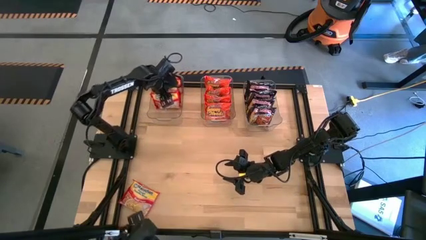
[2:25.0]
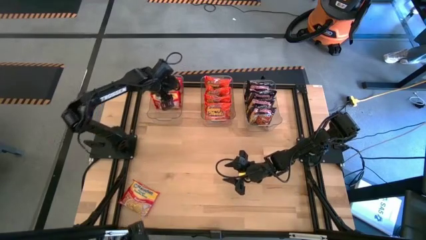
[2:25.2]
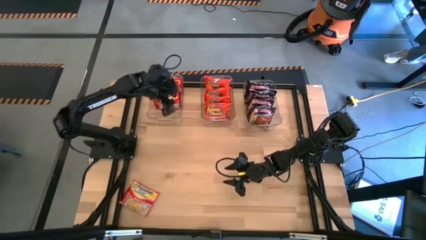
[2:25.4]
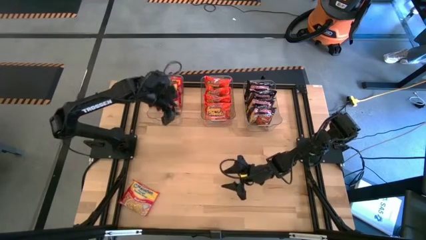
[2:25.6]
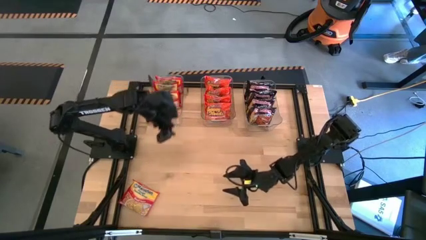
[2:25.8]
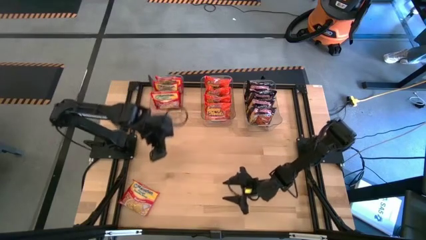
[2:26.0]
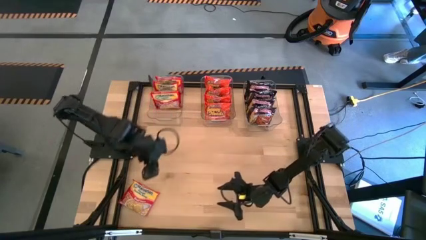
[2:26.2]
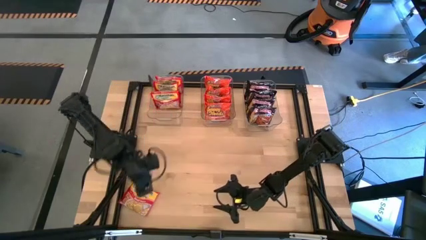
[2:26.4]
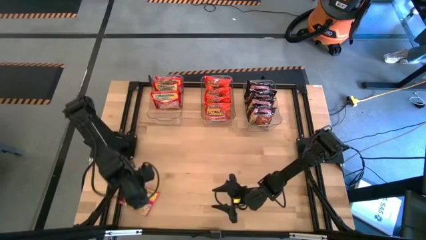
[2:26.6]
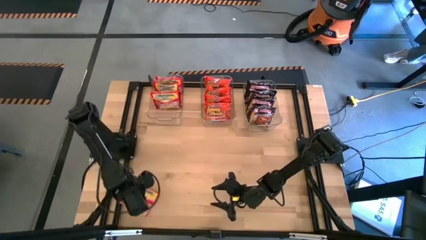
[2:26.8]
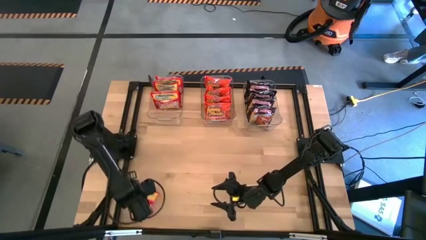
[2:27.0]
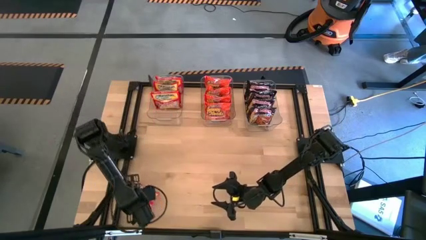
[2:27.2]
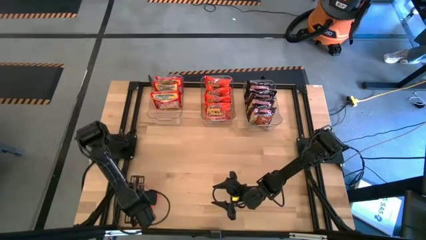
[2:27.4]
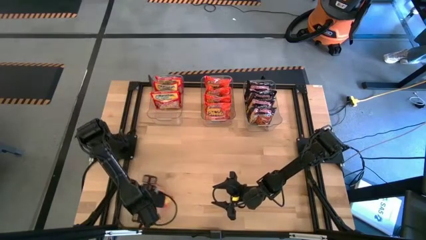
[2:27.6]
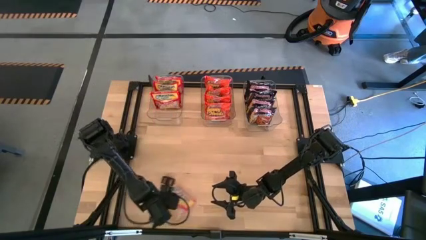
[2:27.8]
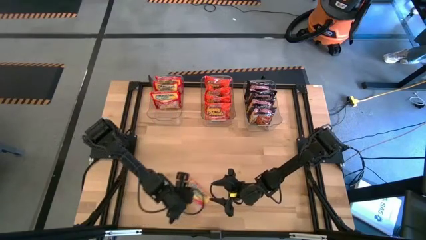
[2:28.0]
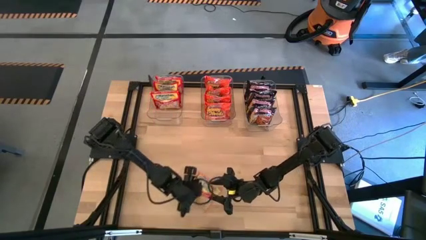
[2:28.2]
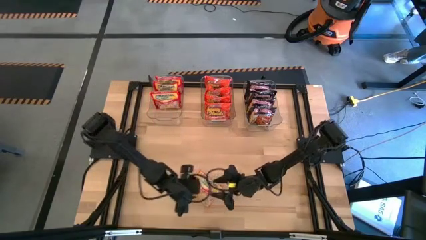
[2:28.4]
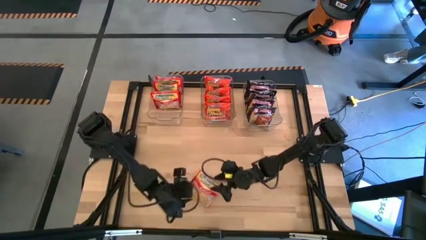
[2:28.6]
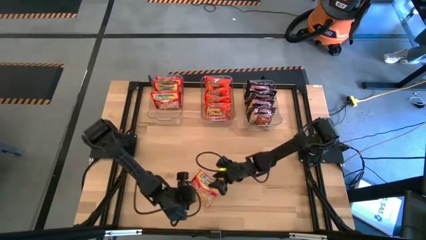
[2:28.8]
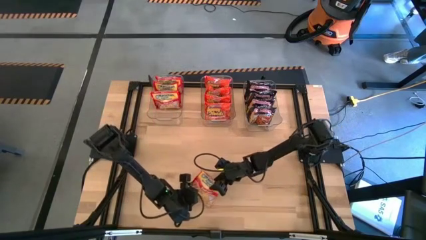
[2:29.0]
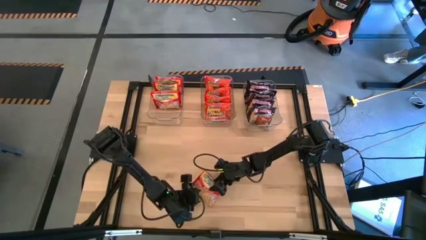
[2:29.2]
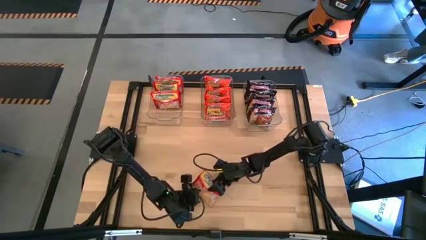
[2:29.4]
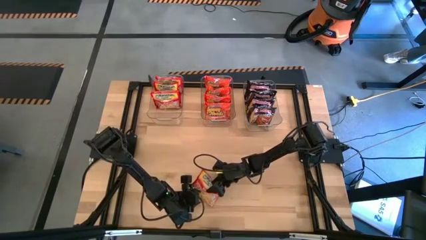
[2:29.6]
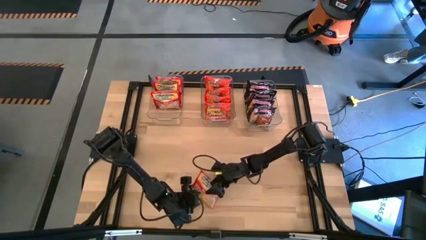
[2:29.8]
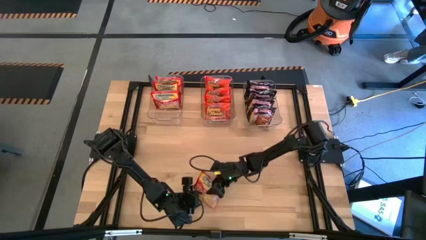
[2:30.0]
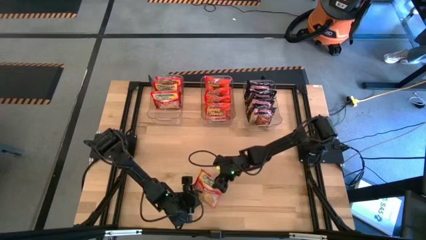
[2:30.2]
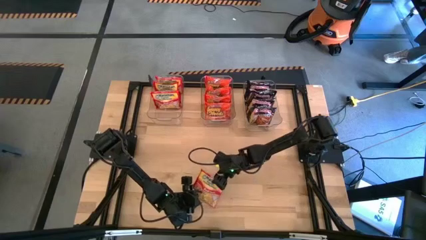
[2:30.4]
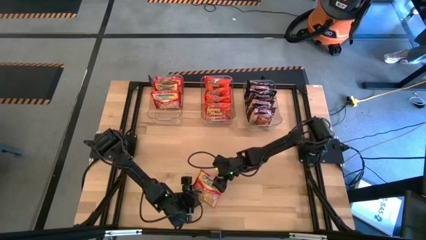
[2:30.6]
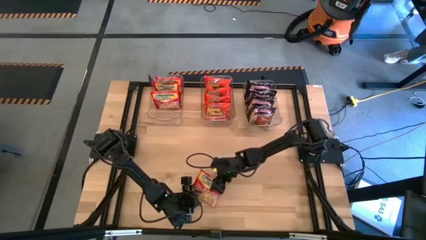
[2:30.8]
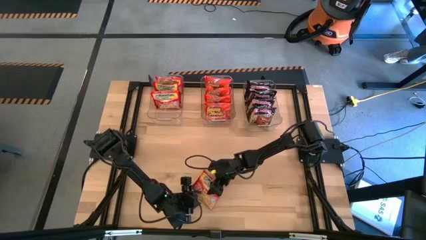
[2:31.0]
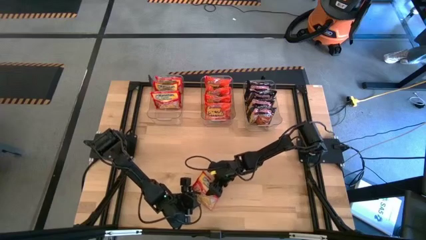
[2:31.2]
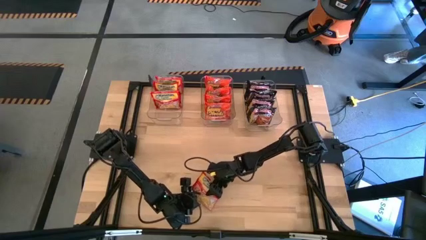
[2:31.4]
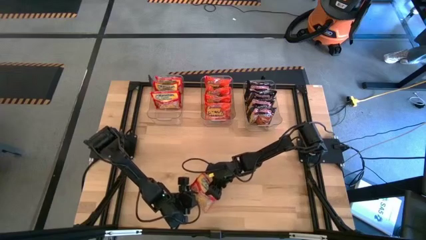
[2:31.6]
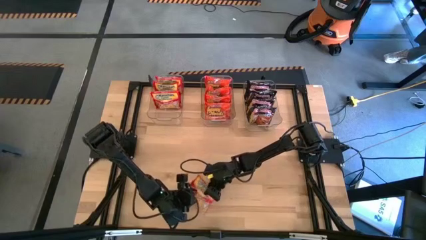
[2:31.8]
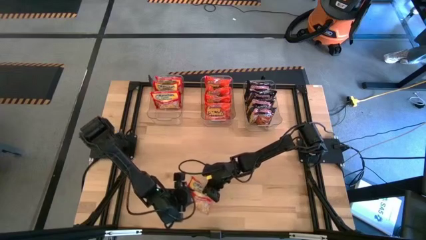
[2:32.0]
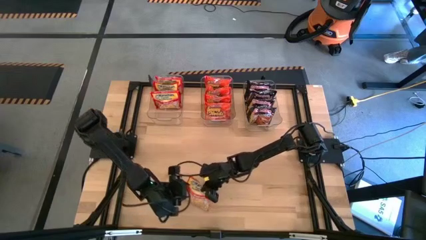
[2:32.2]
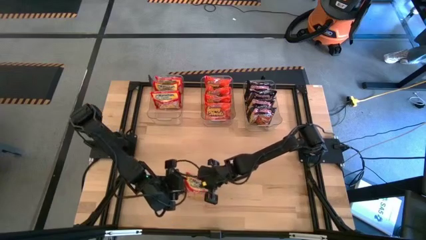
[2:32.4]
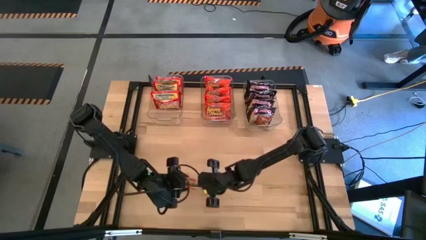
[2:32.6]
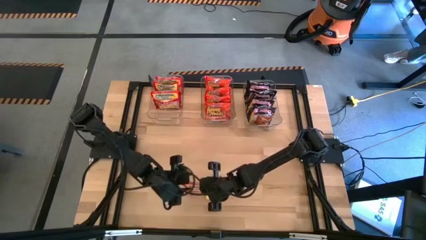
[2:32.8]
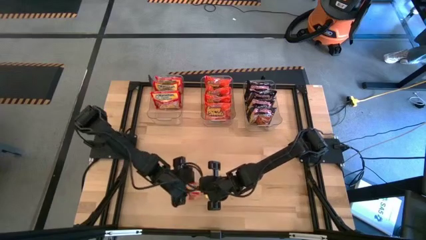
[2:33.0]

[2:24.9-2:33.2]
Task: Sort Maruchan noodles
Put the red noodle pack into the left transparent bin

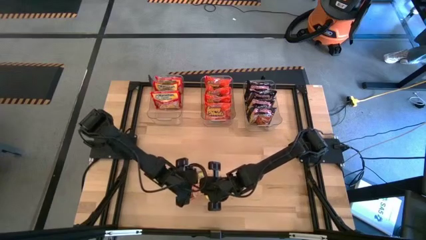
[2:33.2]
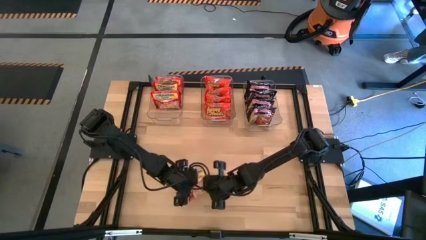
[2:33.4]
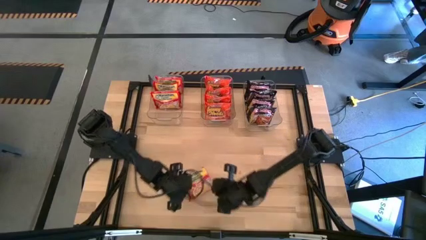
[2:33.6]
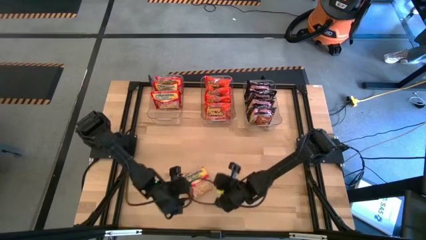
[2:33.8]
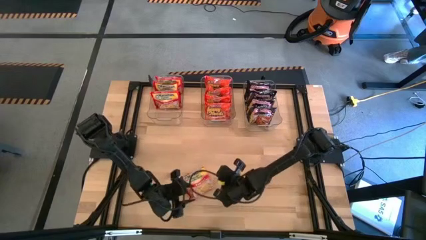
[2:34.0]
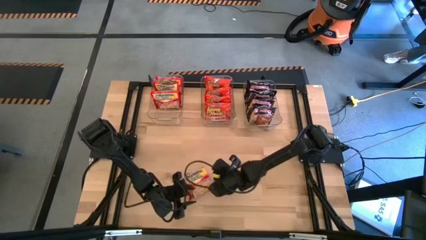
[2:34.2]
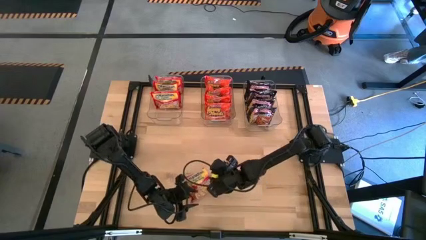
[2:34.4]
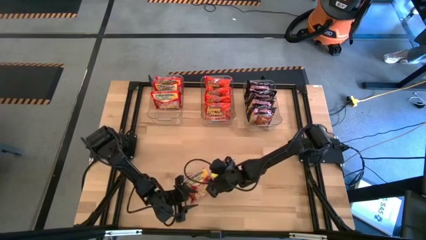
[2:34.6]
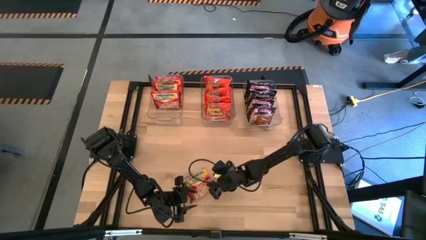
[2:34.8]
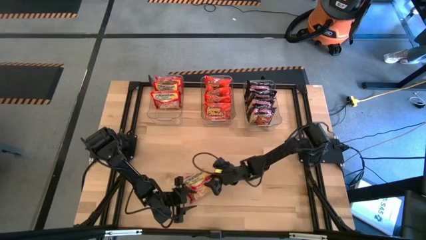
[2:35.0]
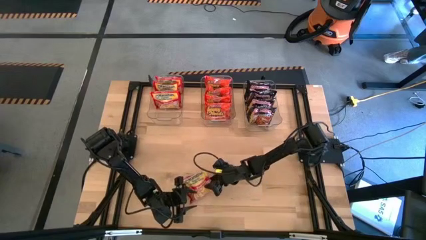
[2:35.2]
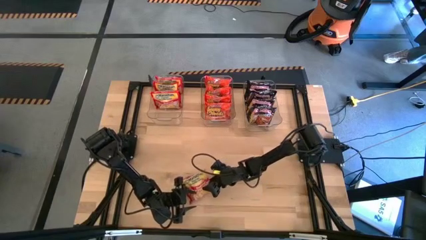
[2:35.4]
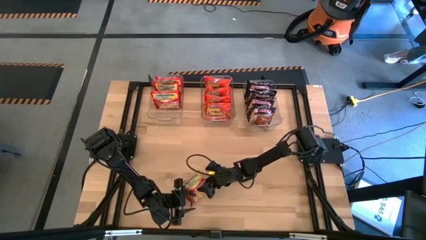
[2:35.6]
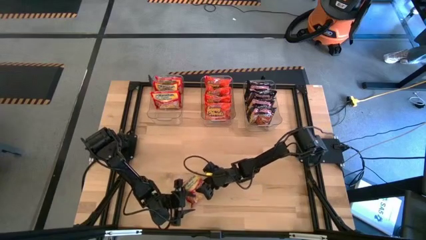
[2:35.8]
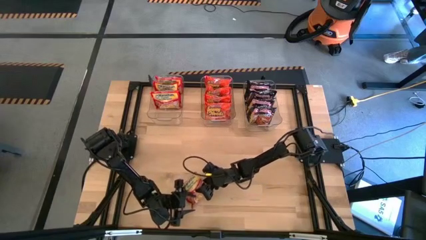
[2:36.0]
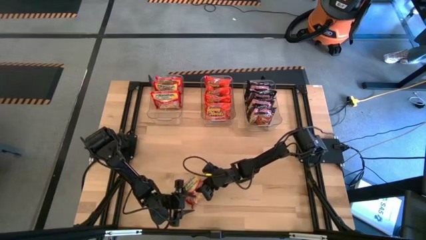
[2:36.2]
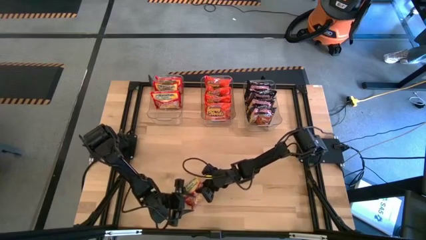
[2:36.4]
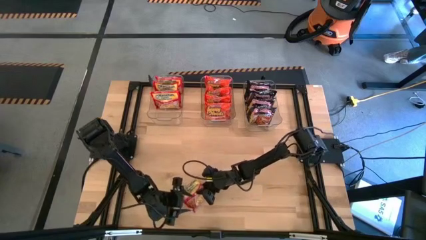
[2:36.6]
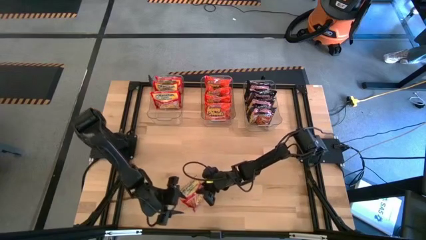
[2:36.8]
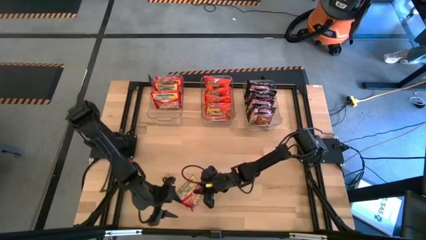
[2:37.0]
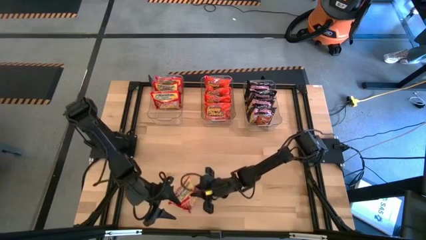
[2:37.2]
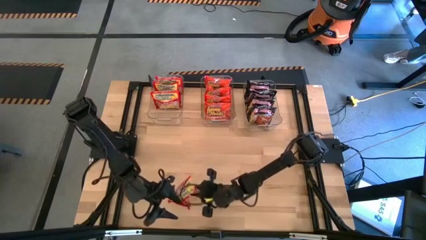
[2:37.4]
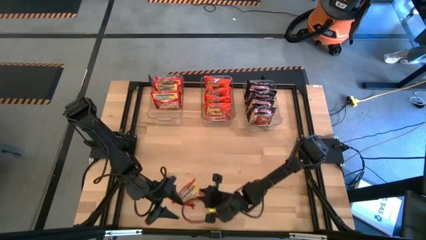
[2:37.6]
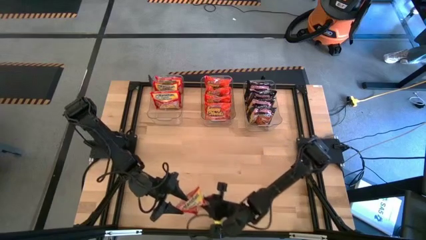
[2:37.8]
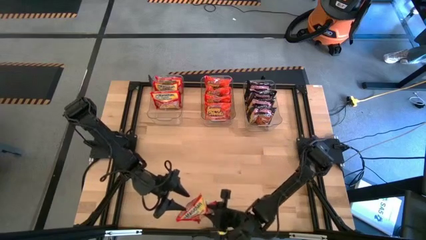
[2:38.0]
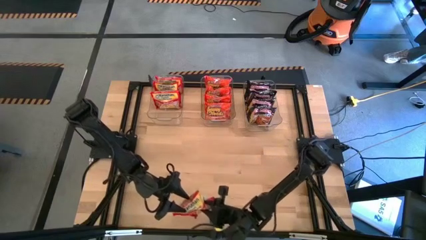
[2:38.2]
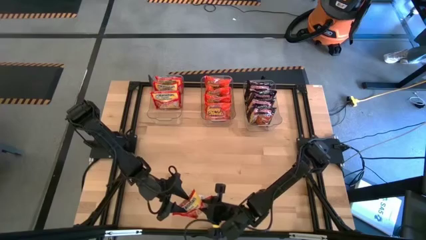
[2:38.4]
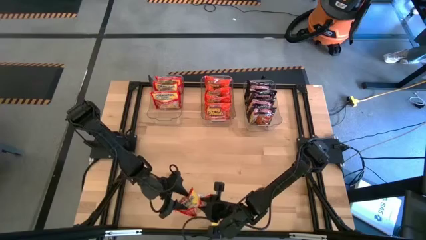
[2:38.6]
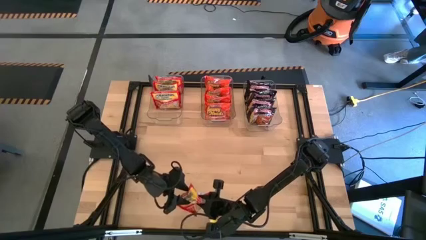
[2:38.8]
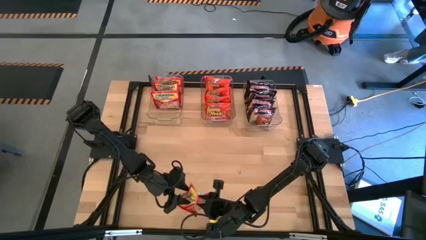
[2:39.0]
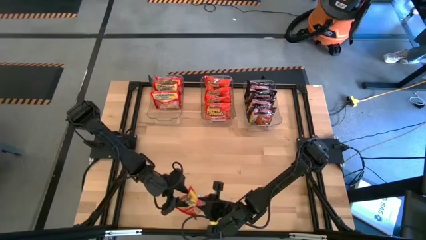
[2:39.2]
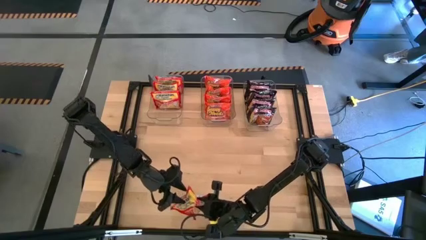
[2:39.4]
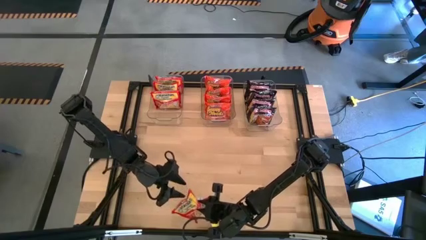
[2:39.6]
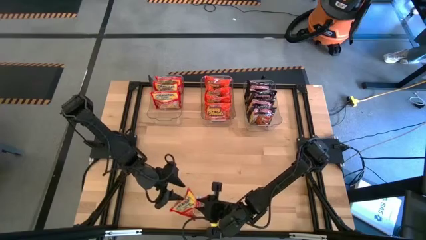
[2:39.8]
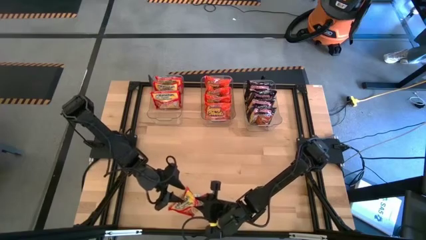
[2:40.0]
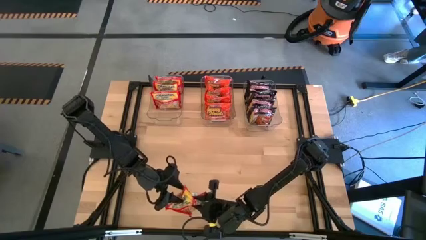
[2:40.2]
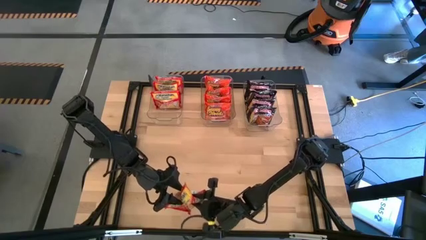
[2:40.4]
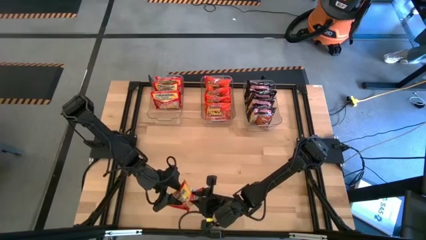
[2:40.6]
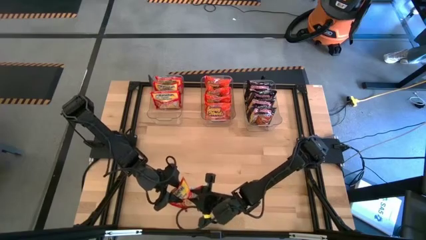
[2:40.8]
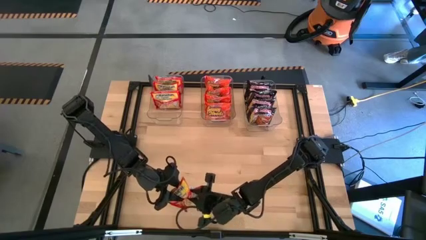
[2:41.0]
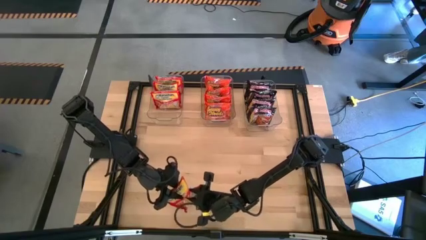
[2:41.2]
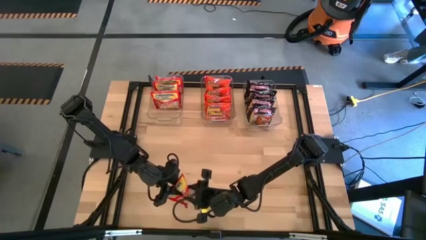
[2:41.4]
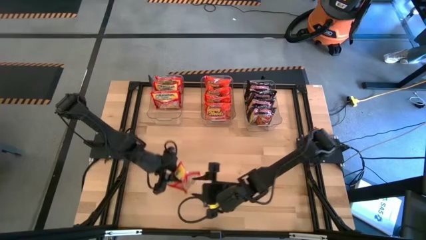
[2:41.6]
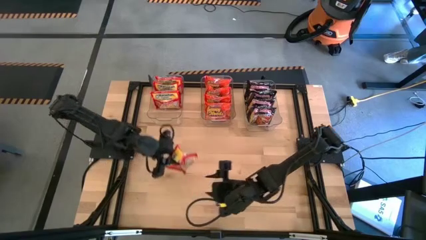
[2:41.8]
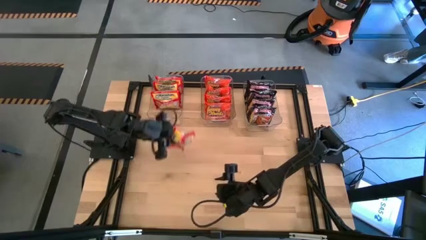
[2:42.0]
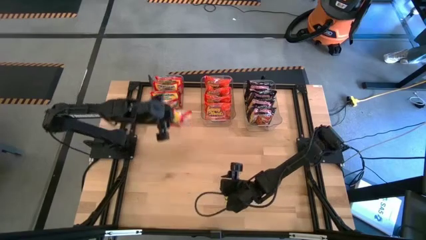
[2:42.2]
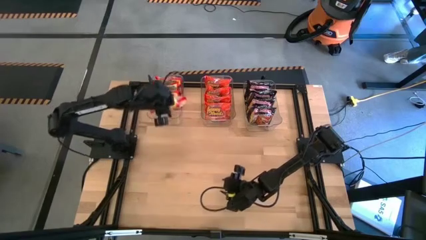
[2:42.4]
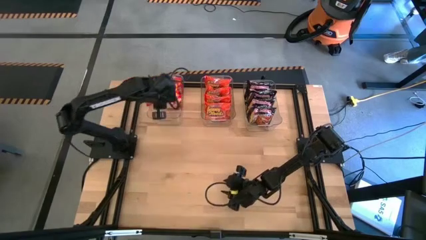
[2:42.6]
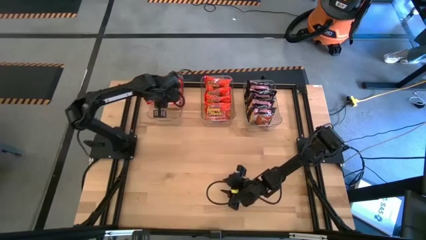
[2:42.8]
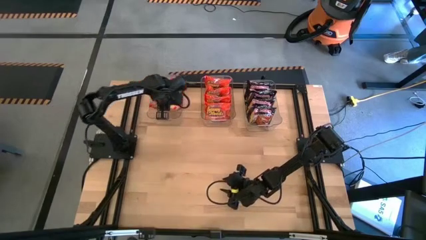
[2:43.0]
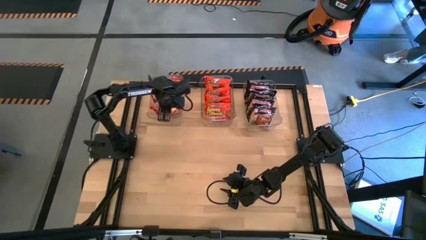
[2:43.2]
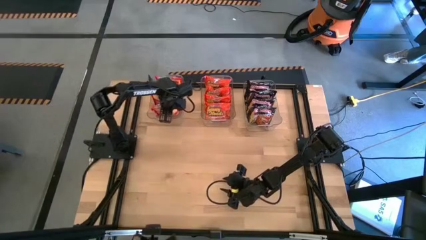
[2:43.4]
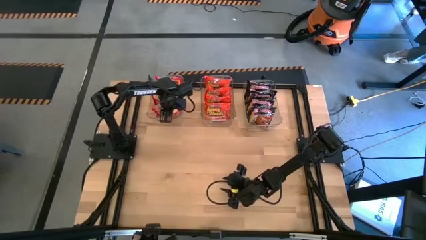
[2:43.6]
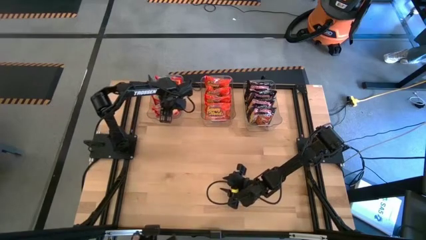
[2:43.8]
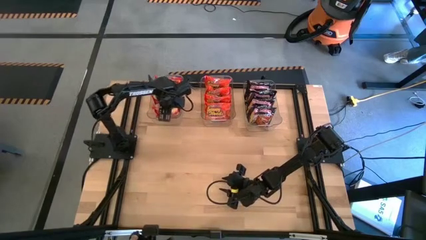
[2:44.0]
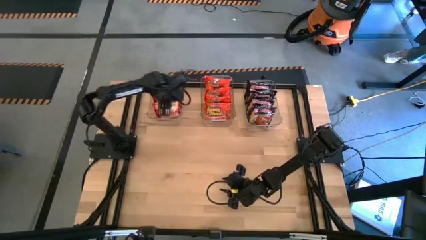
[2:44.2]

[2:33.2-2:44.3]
Put the red noodle pack into the left transparent bin
